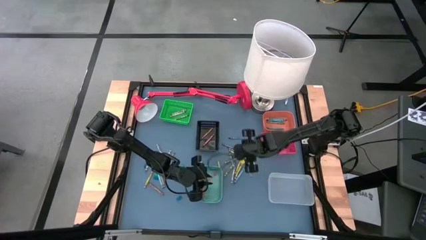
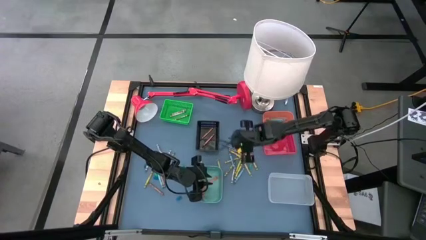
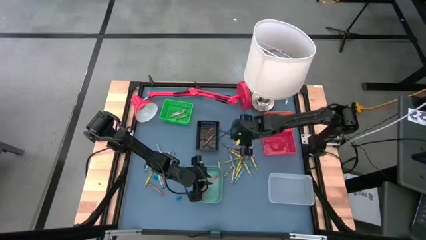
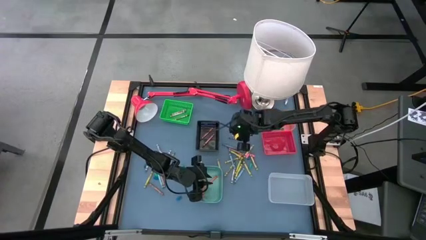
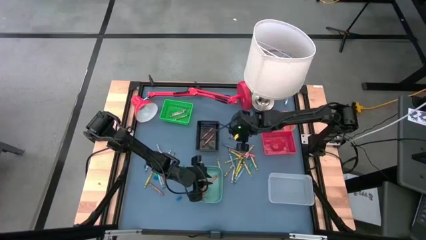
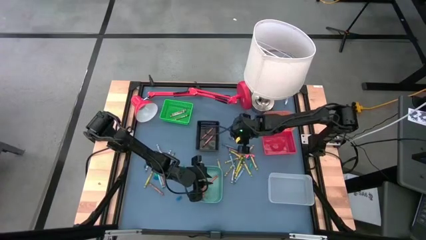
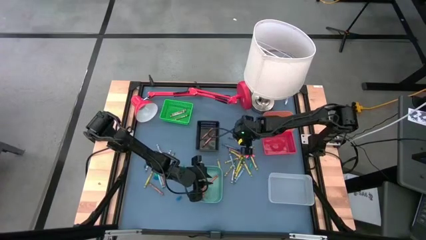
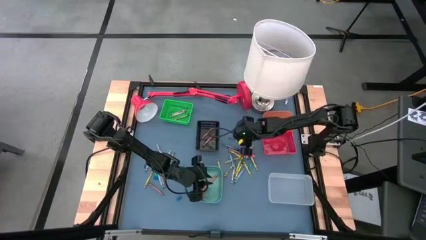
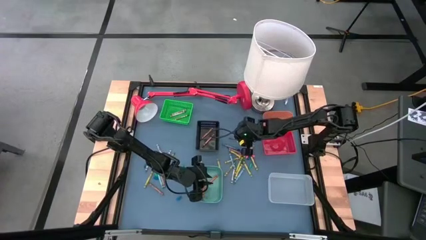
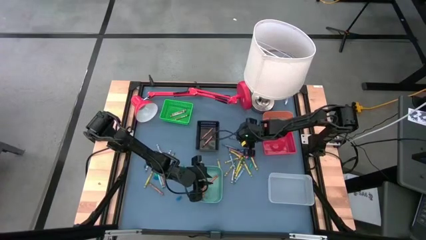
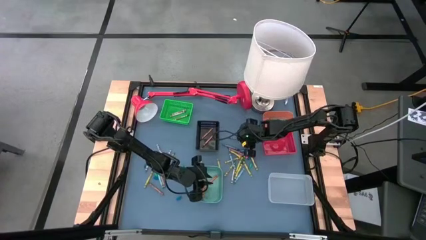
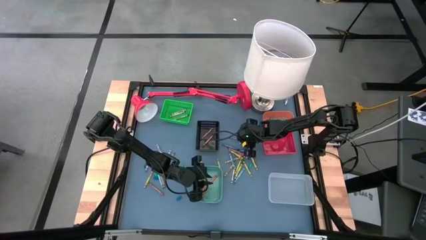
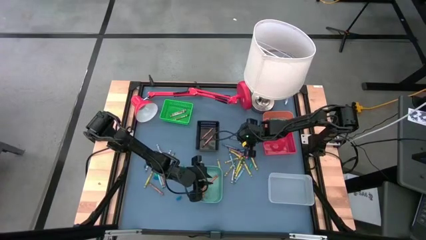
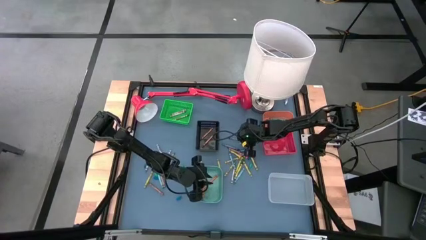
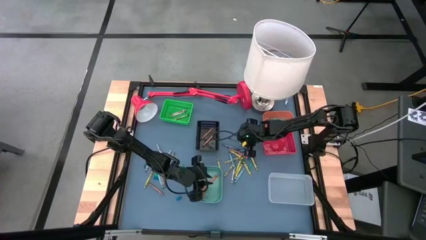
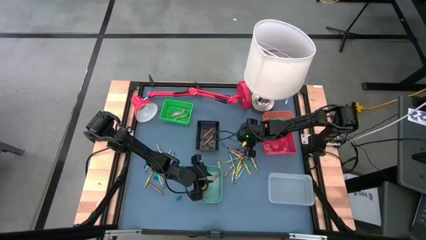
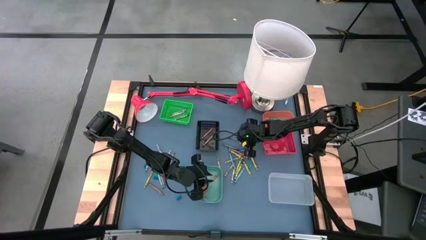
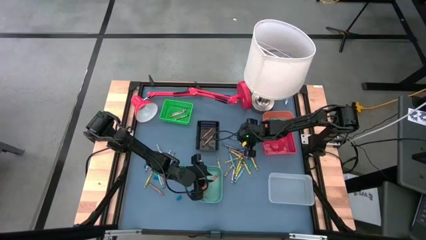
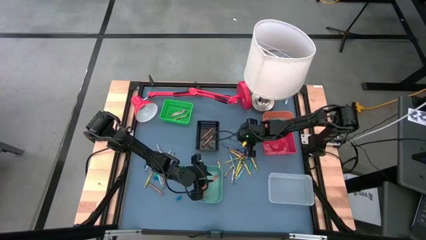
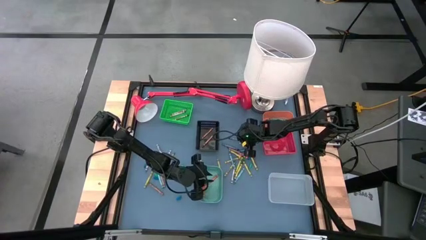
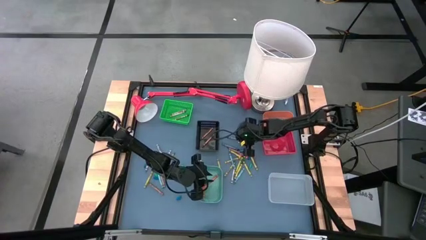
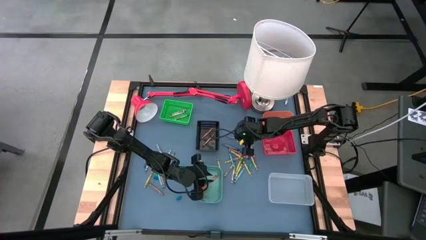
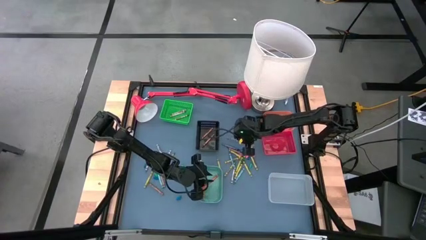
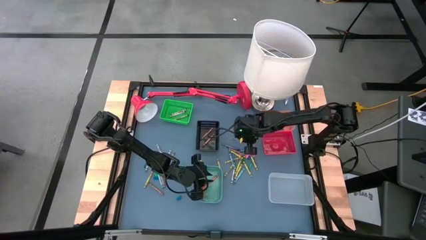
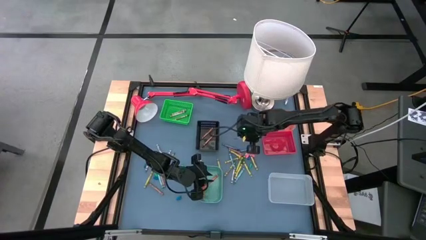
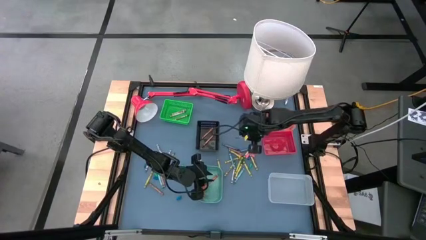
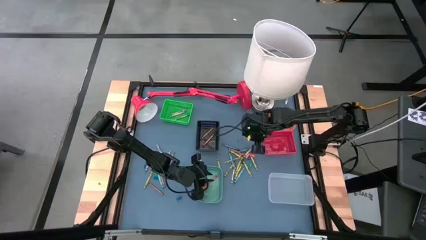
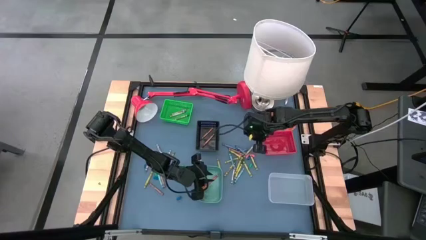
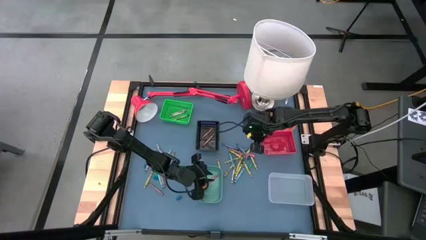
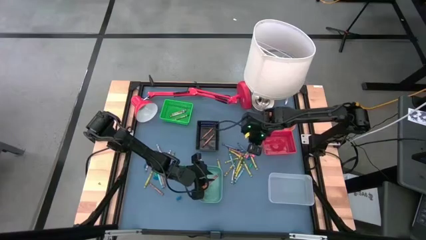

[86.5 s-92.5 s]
Task: Sort crayons
Put the purple crayon into the red bin

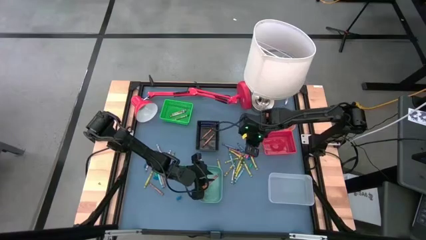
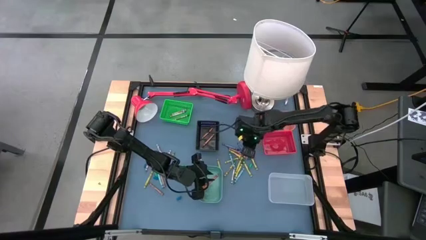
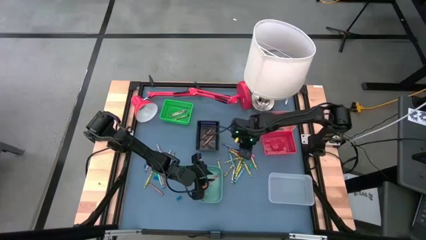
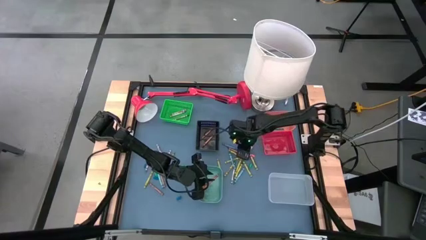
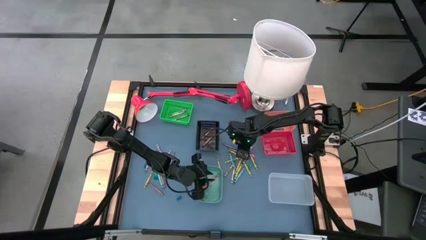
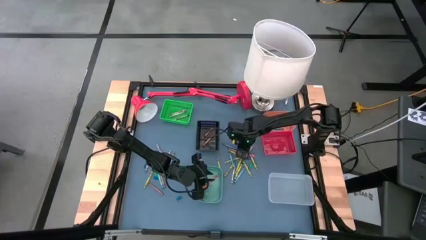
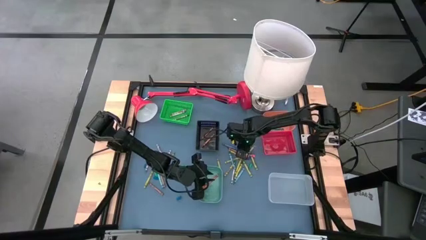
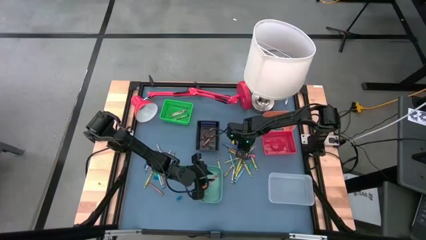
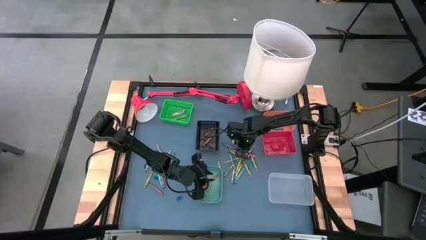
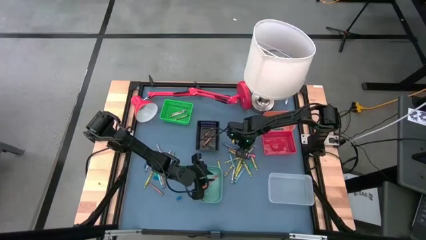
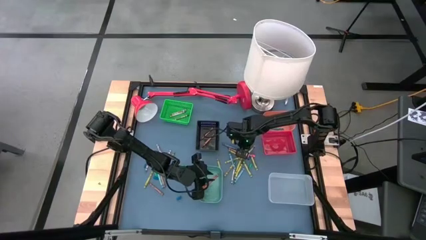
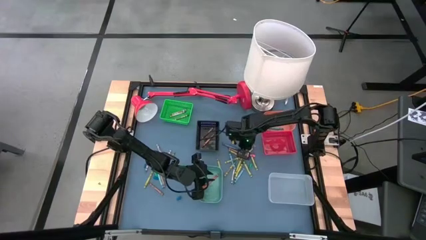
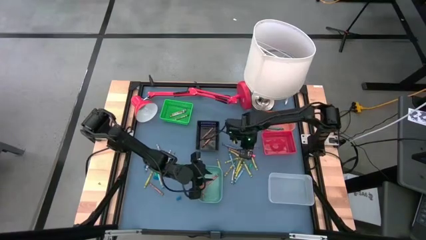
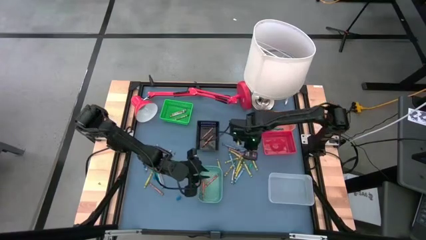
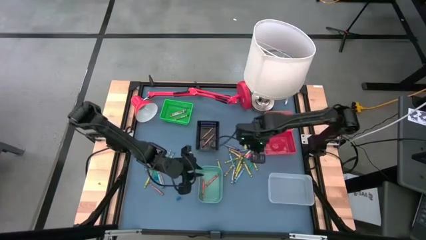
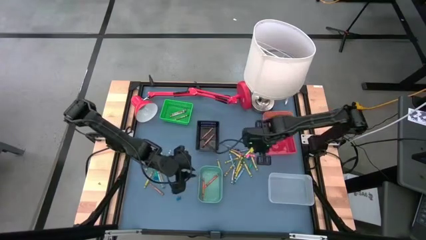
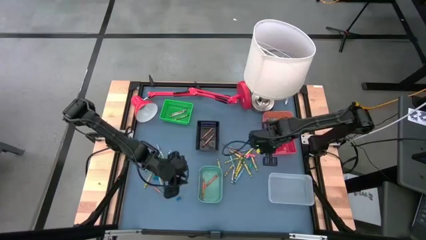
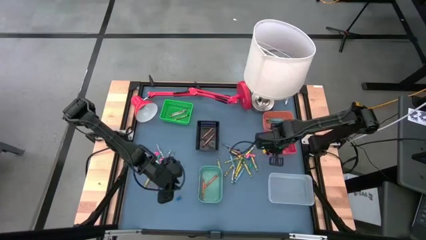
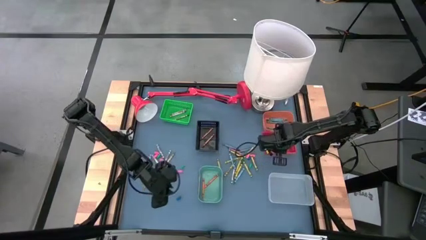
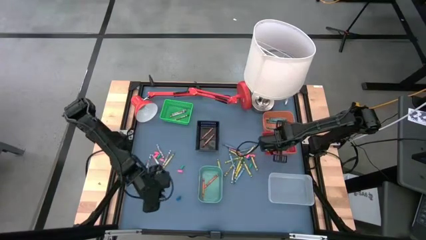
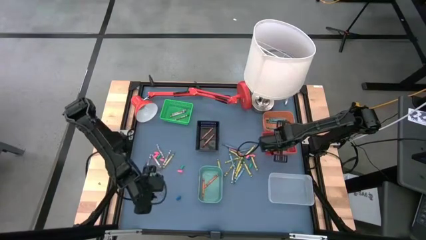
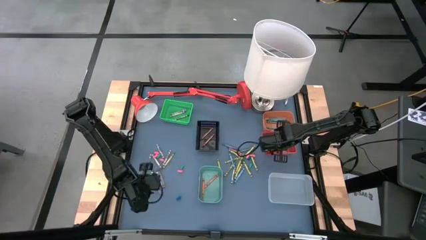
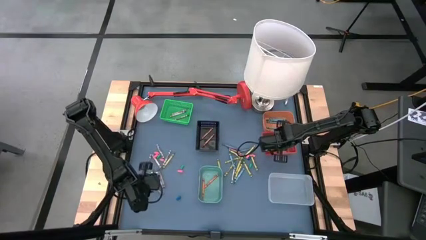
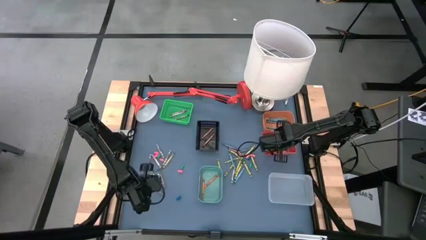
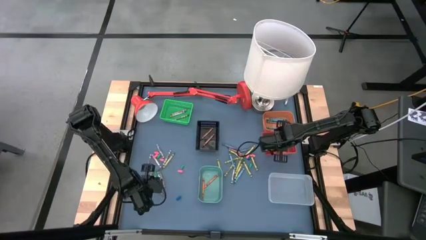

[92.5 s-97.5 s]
Put the purple crayon into the red bin

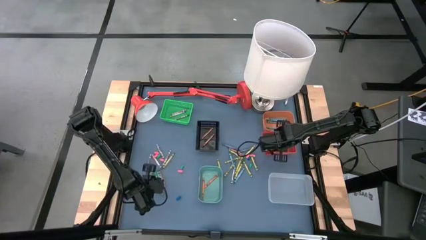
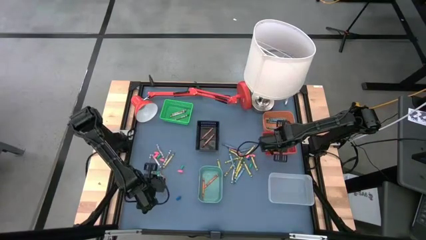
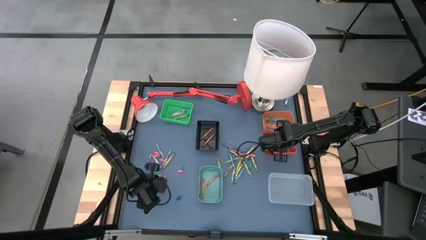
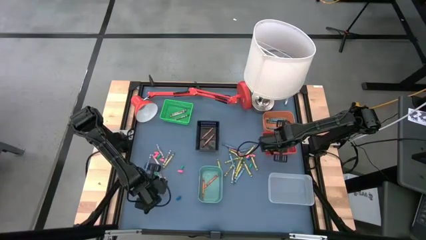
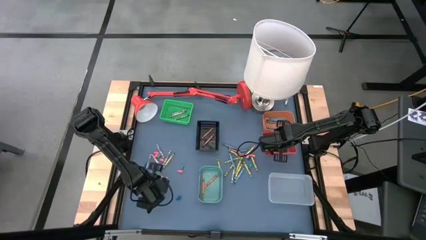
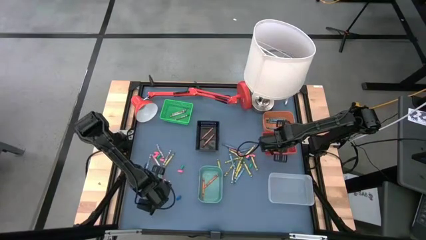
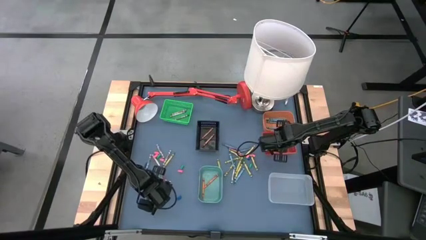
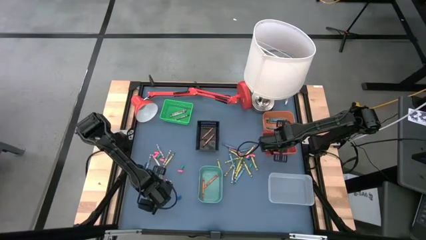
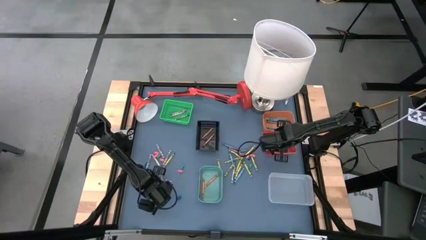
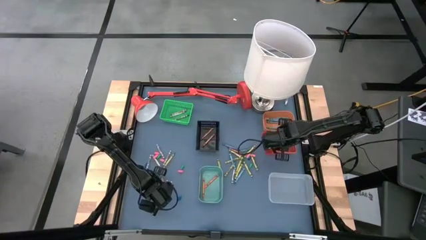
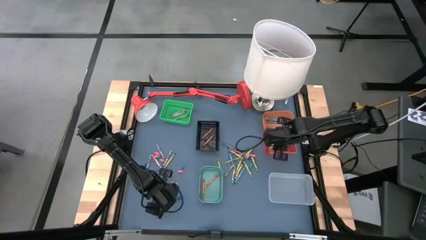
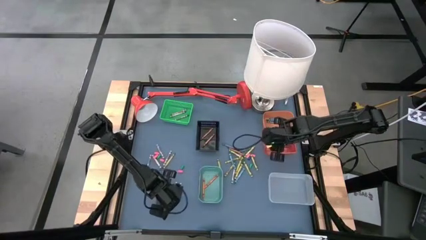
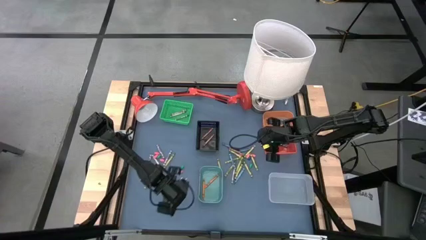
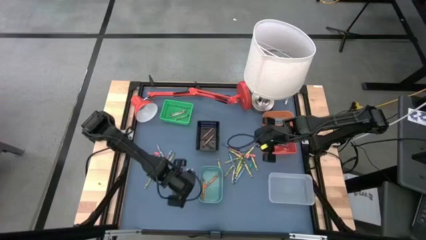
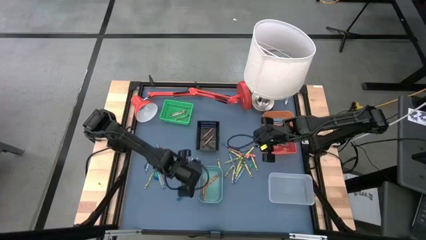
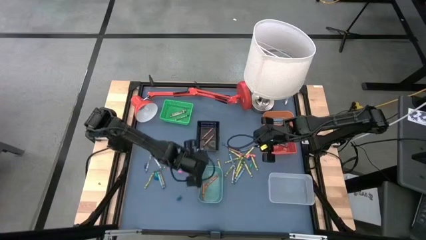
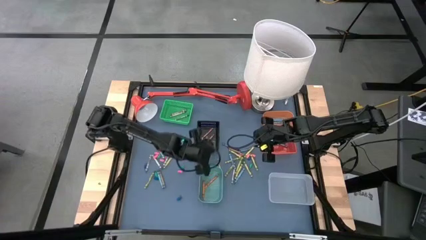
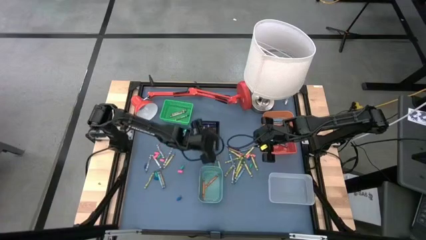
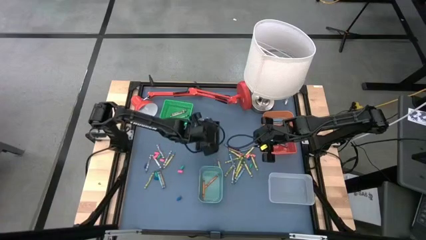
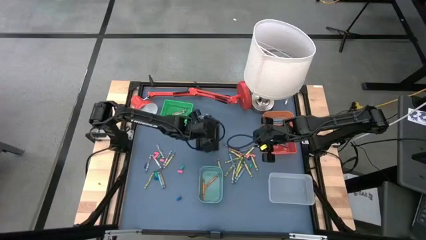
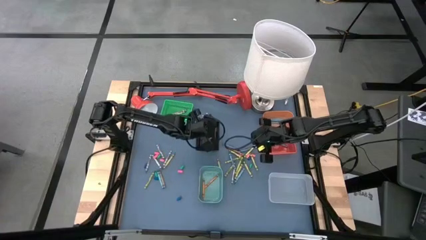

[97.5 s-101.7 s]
Put the brown crayon into the black bin

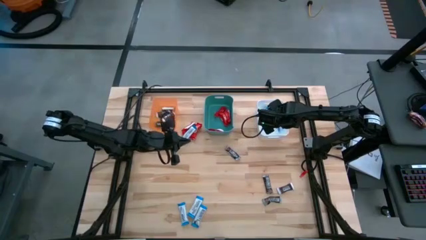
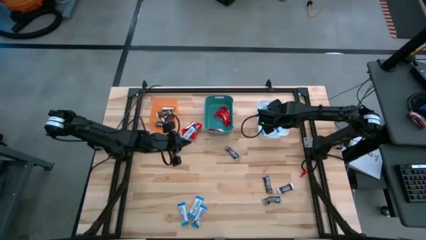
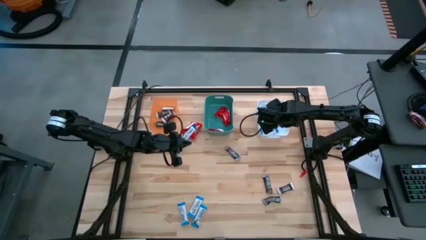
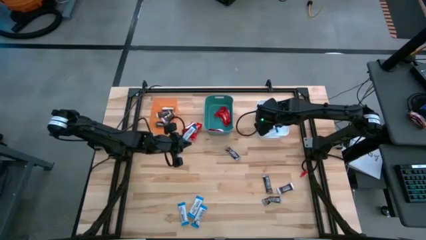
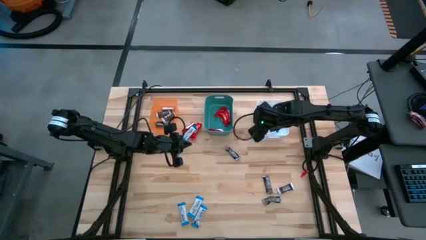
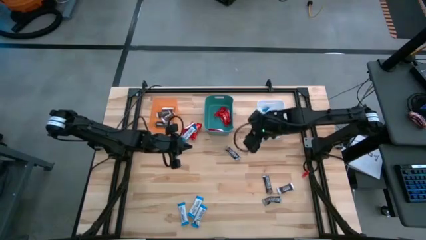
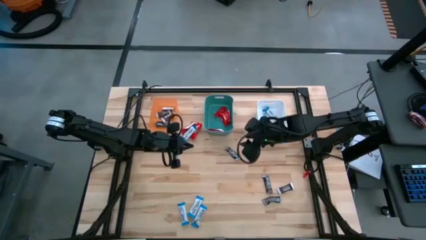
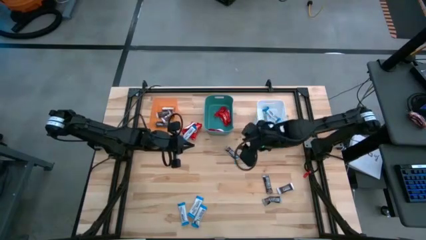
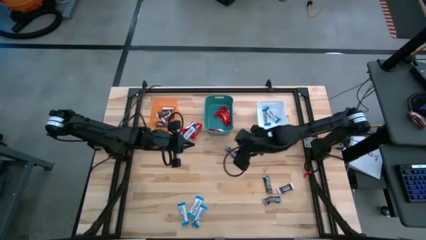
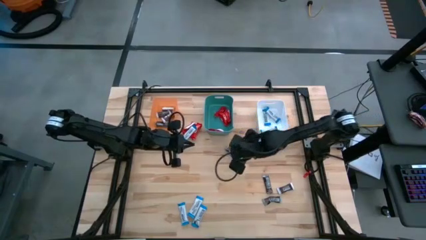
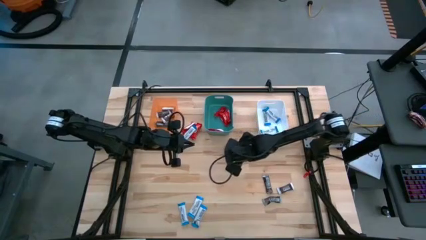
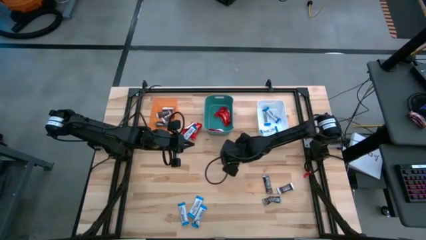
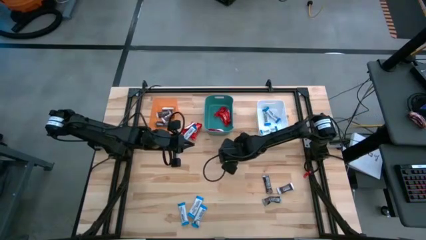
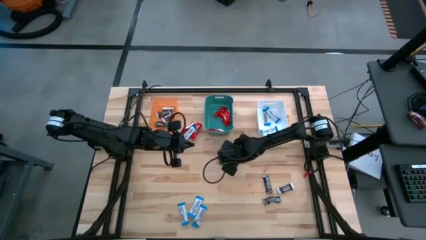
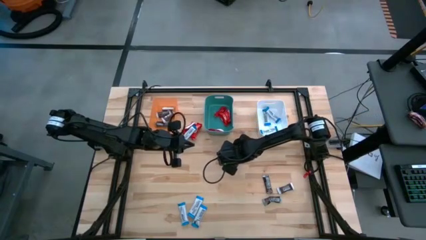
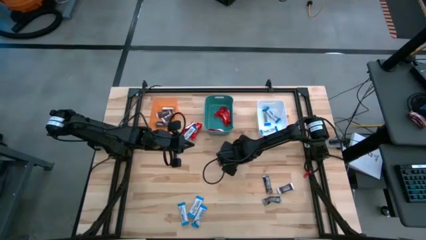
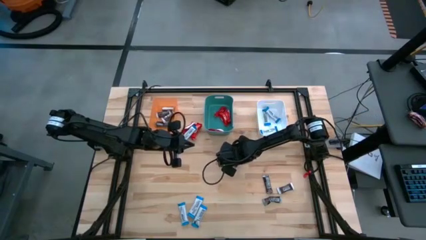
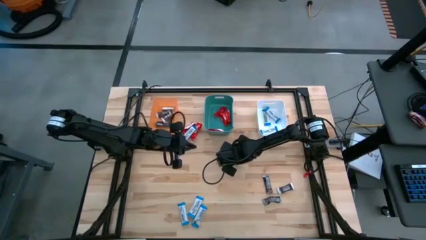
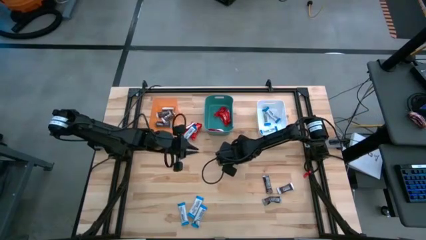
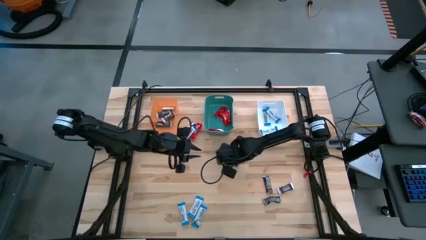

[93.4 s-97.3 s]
Task: Organize candy in baskets
Put the black chocolate bar into the orange bin
